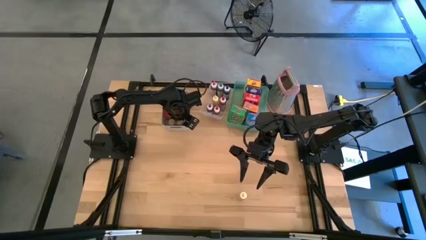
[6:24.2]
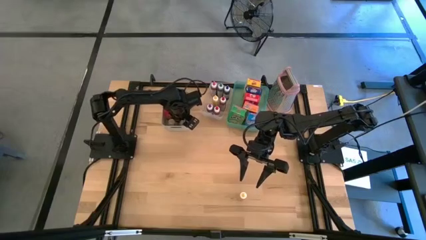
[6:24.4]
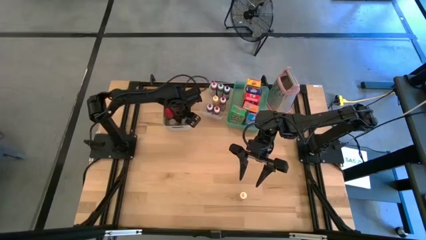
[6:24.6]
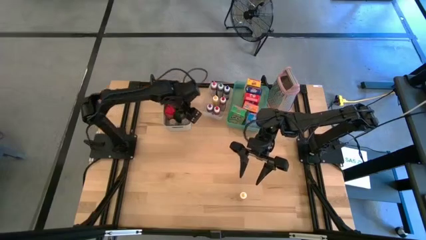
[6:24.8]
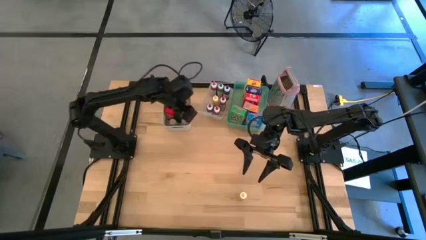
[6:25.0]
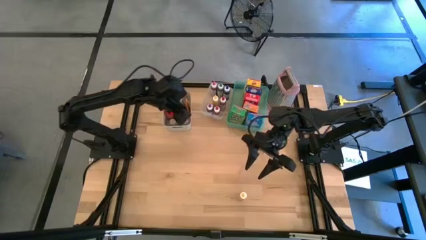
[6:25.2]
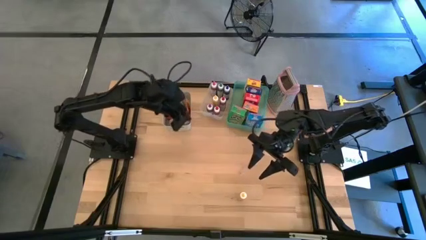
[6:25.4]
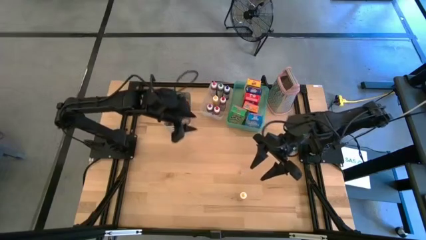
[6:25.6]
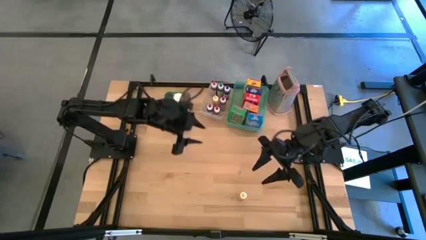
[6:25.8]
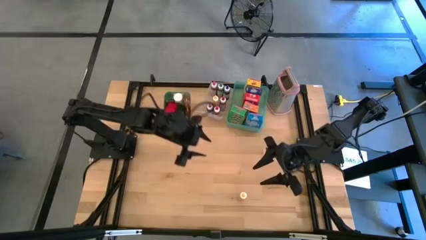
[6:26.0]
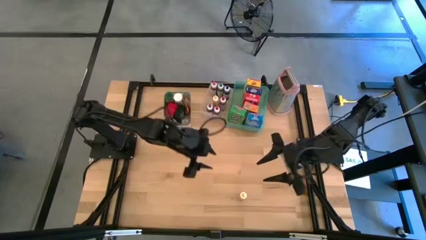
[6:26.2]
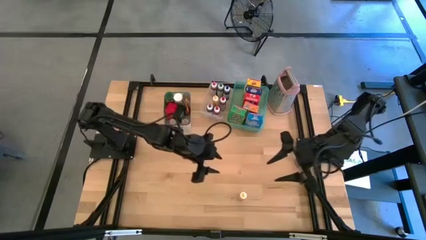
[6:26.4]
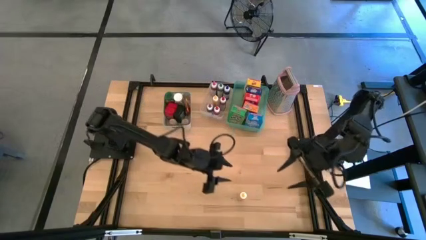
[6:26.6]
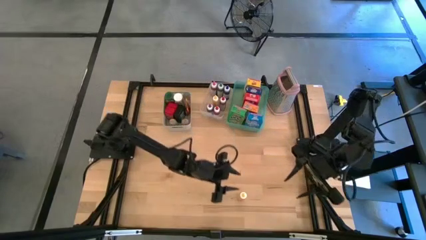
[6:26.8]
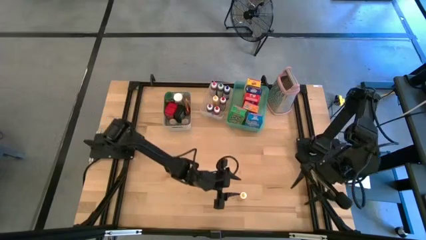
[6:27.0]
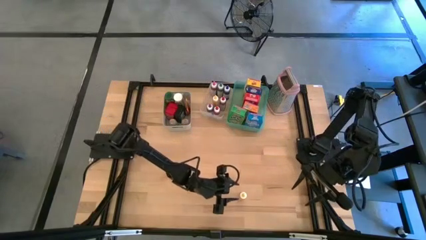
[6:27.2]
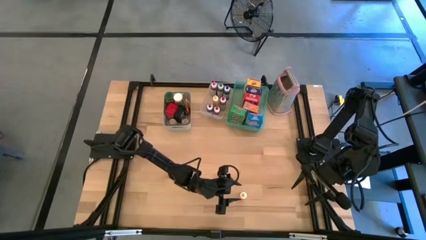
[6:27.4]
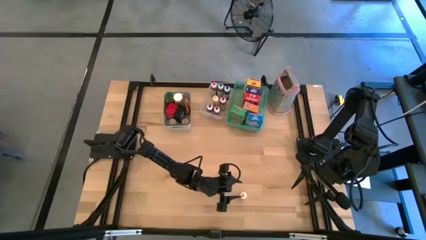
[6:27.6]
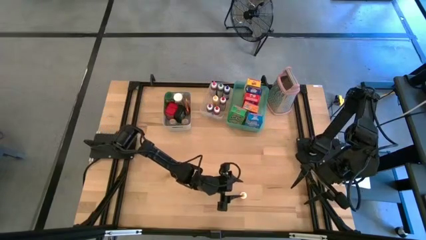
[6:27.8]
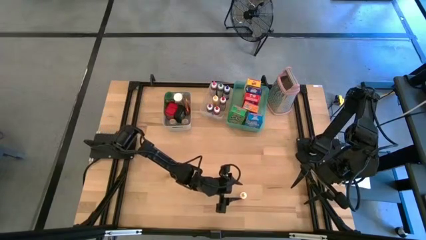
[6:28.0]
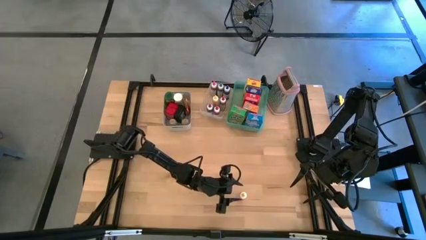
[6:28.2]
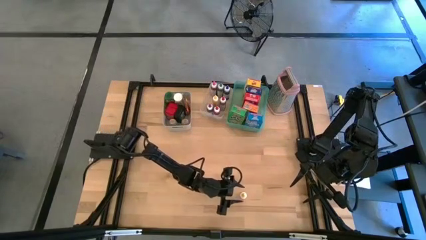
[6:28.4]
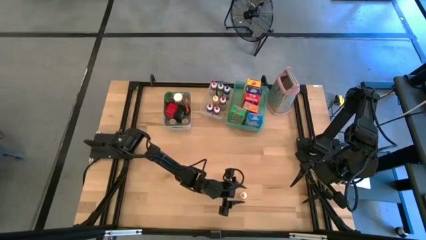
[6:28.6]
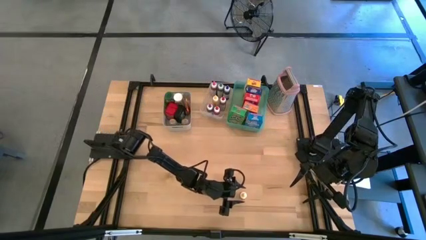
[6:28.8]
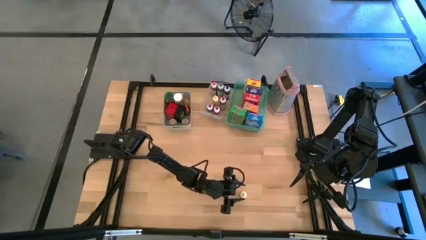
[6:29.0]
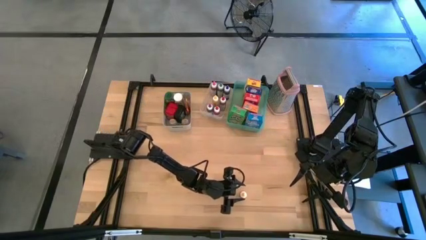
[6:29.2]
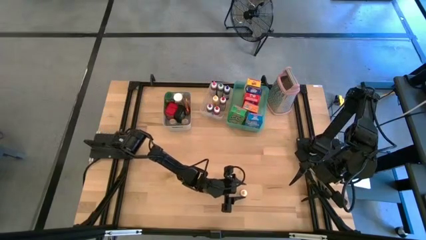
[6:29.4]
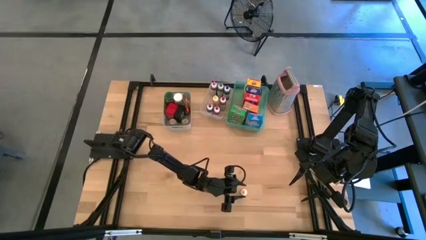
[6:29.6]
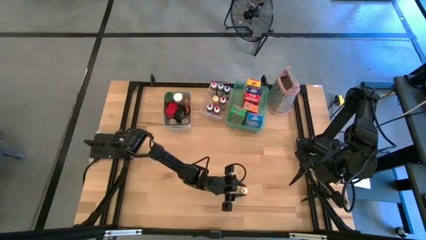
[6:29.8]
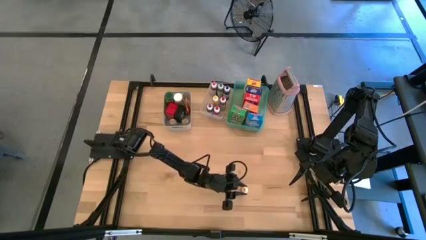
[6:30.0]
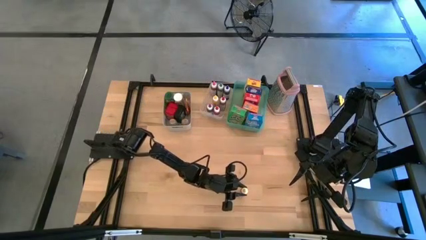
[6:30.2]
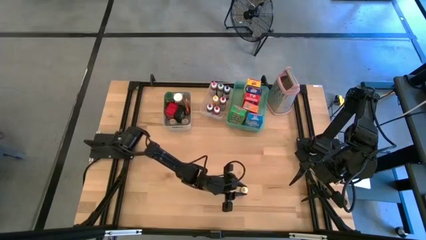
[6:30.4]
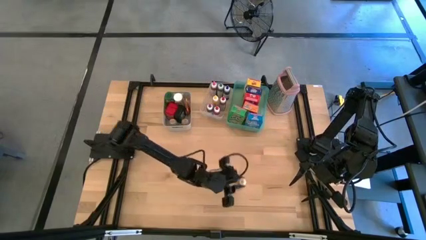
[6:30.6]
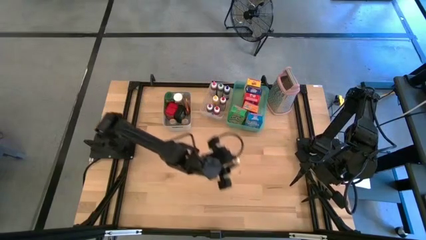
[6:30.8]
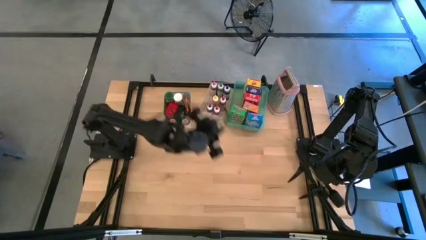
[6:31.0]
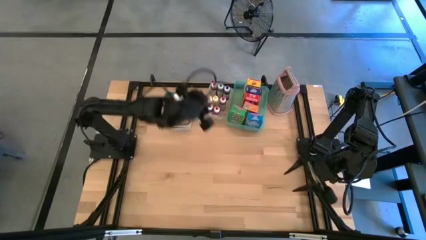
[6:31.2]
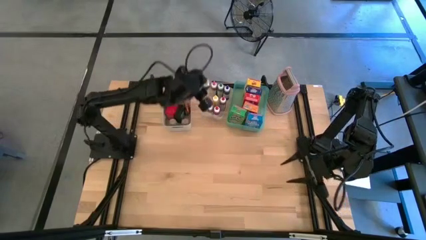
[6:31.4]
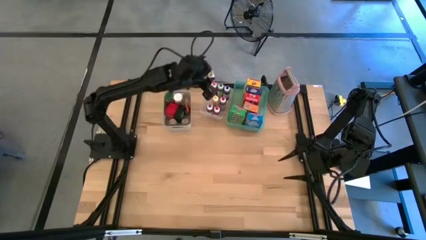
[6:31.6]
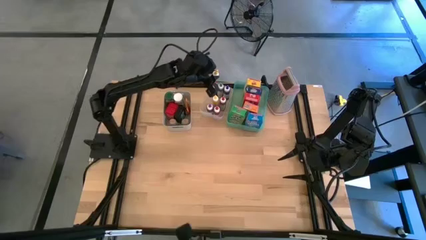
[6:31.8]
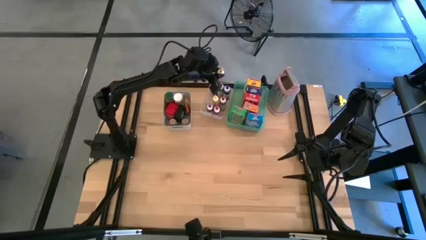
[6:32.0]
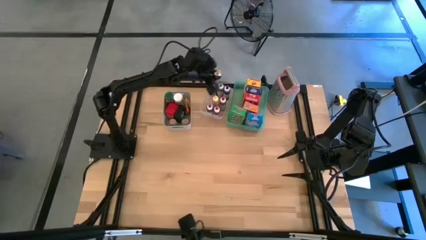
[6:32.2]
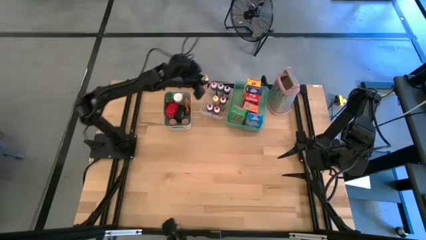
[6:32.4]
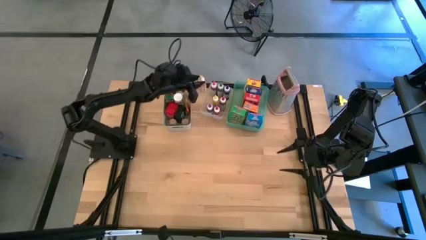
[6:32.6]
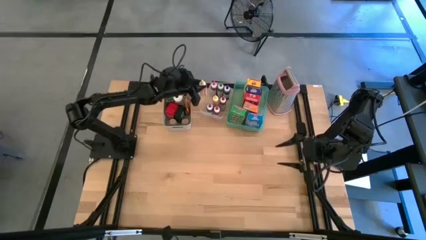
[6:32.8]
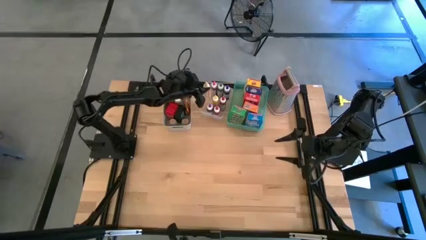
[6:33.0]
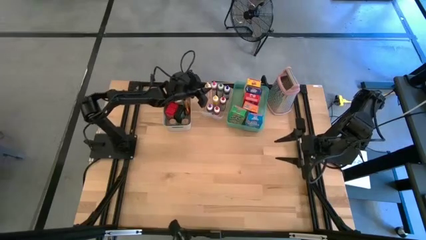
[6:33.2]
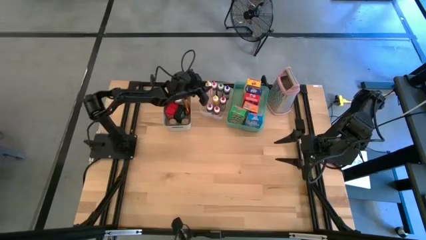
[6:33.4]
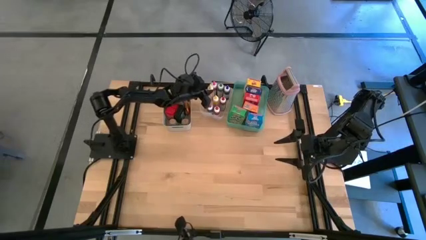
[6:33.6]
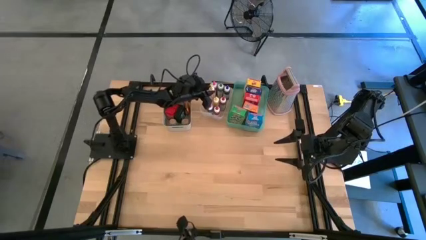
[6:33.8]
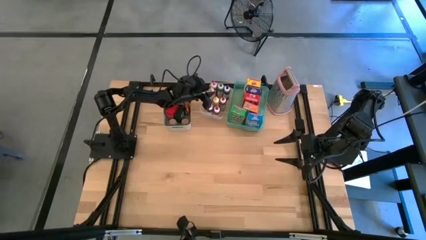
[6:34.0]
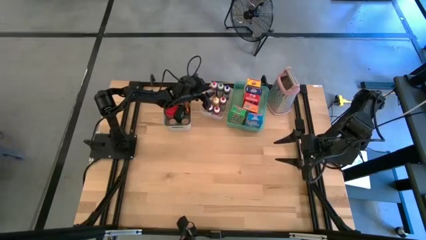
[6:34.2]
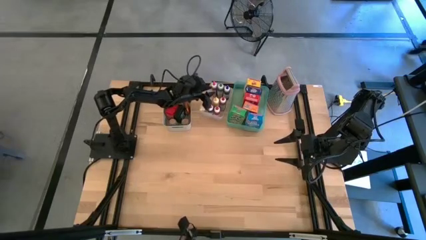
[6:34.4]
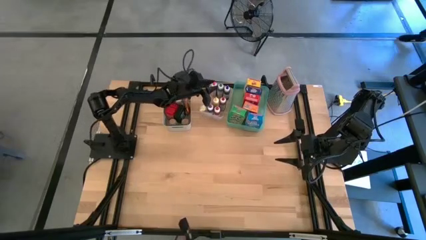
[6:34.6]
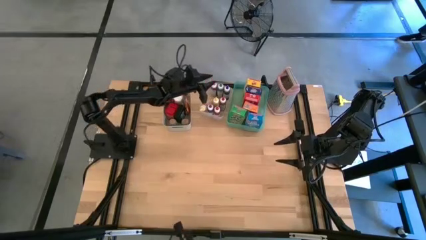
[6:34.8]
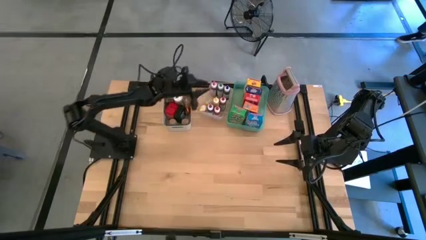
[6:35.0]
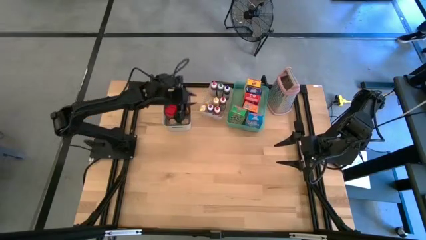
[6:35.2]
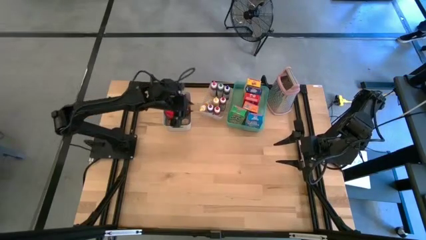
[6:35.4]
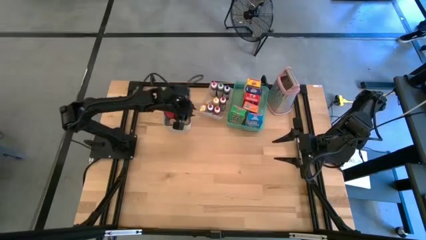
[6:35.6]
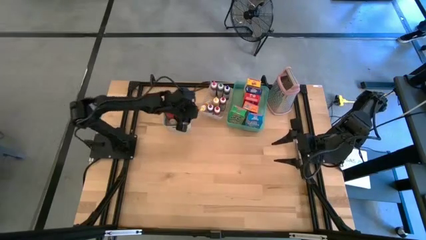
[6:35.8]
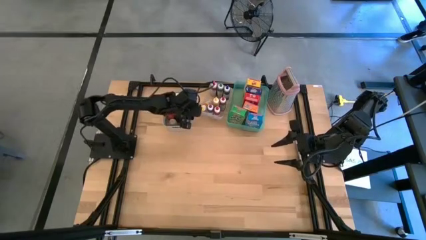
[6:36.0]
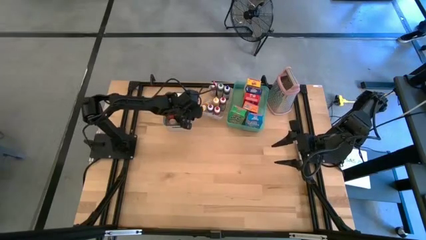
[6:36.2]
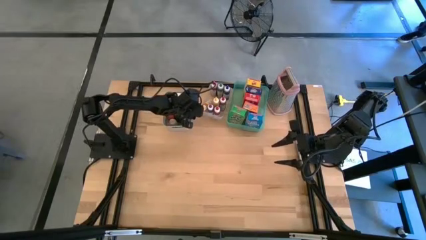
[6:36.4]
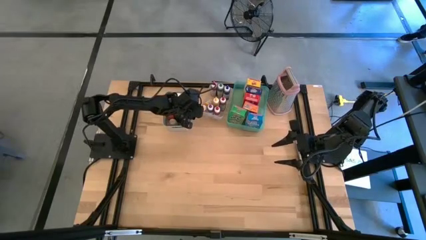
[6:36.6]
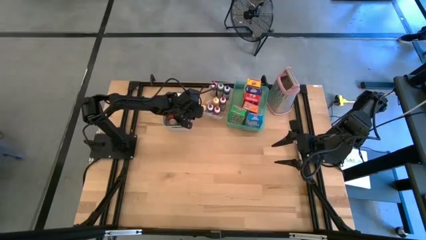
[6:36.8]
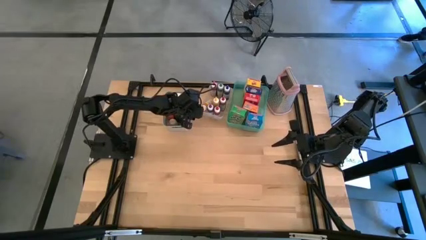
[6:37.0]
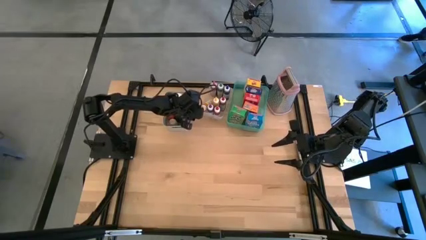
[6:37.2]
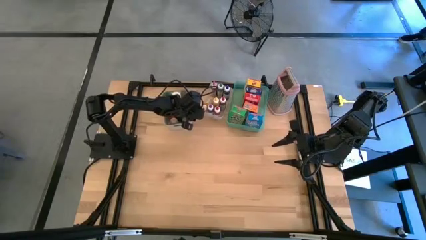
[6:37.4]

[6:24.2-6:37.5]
Task: Pick & Place Kitchen Items
Put the yellow food coloring bottle into the transparent bin
